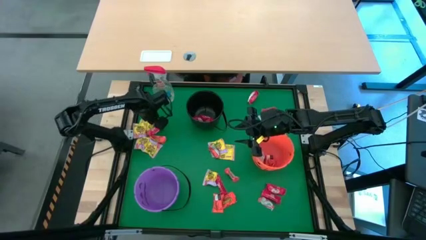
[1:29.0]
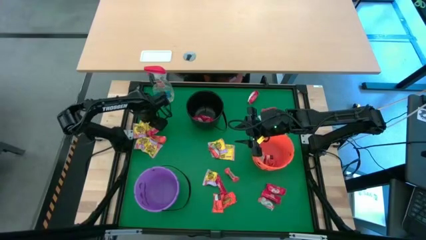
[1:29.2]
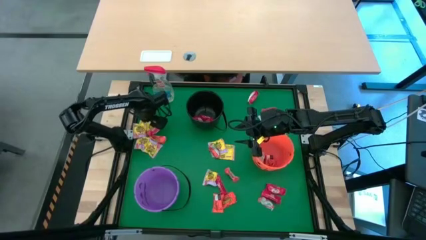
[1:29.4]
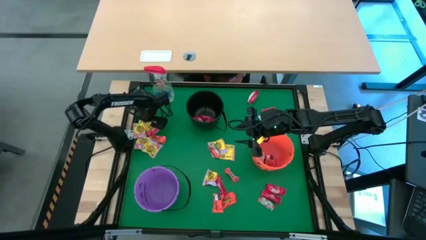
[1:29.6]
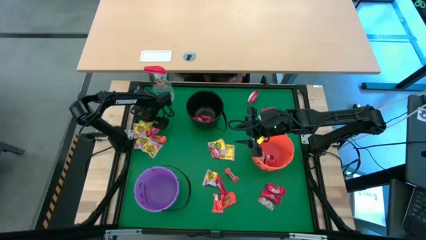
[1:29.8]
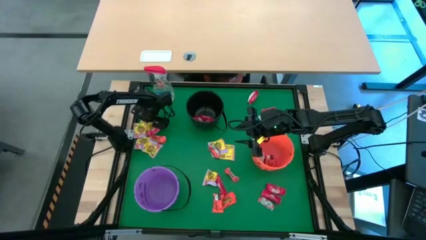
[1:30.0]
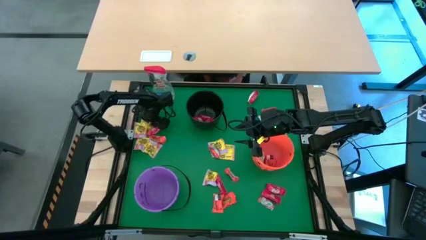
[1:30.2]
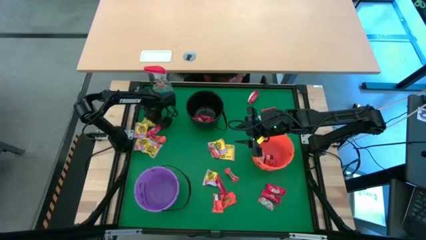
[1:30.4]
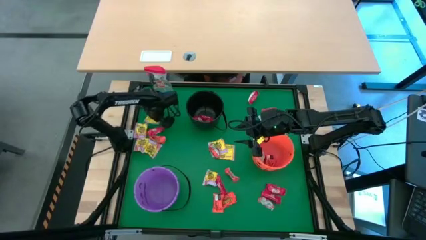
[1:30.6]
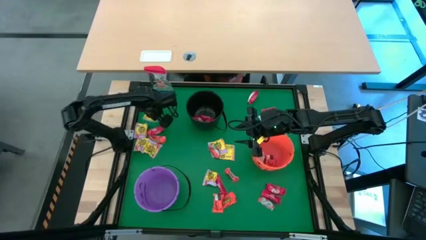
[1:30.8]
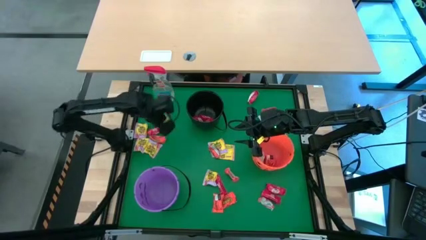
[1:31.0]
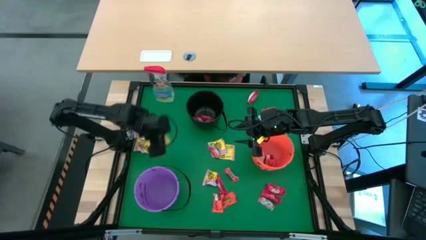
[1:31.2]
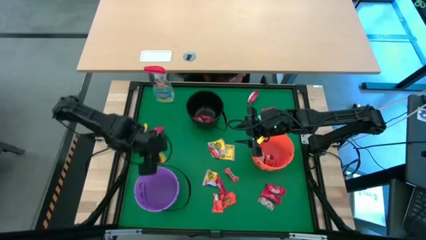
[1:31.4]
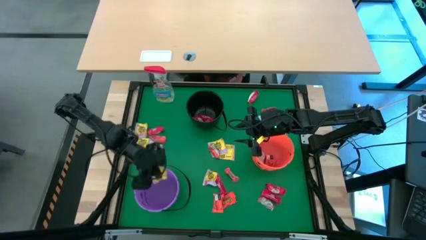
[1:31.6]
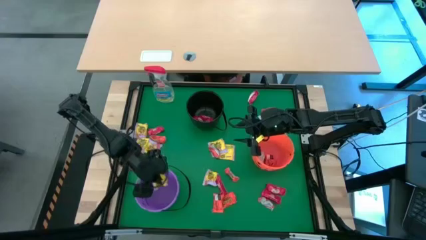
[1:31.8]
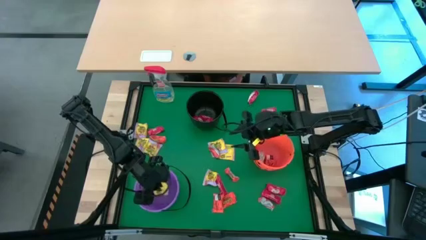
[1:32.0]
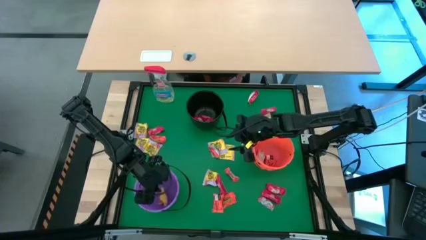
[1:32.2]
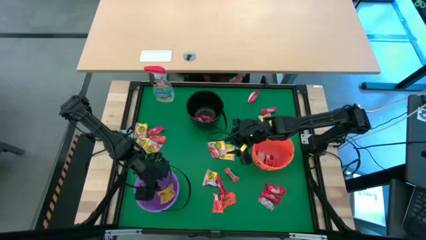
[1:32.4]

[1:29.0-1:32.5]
Task: Sort candy
Put the yellow candy into the violet bucket

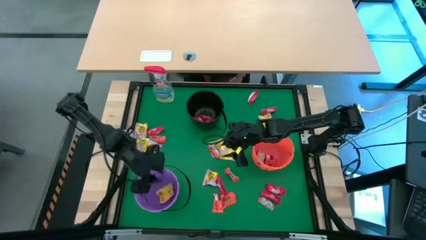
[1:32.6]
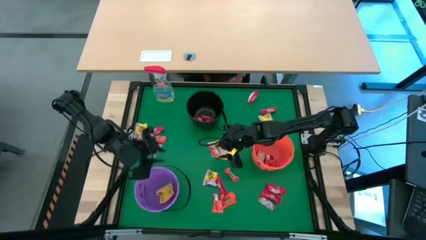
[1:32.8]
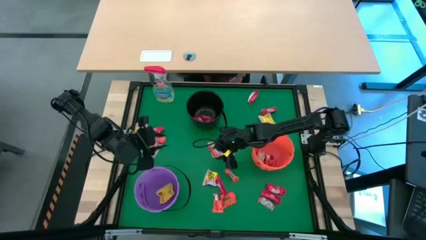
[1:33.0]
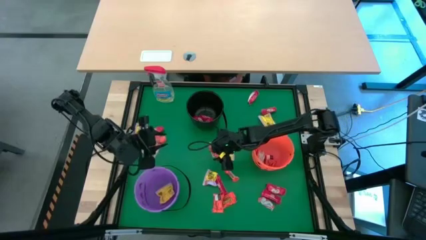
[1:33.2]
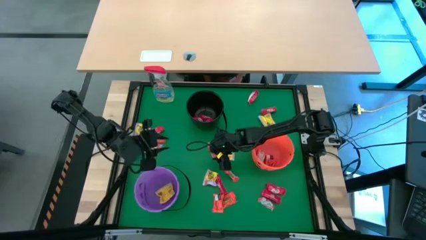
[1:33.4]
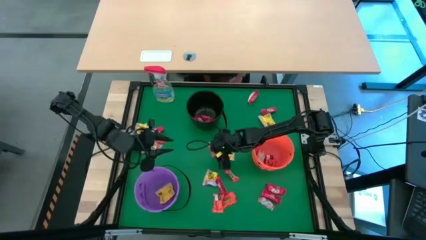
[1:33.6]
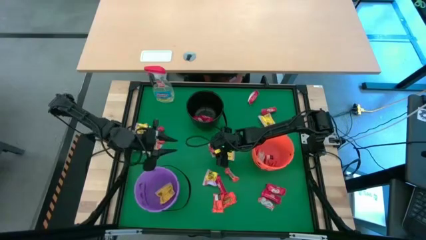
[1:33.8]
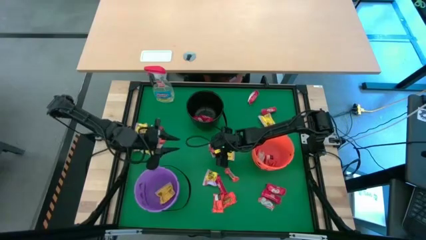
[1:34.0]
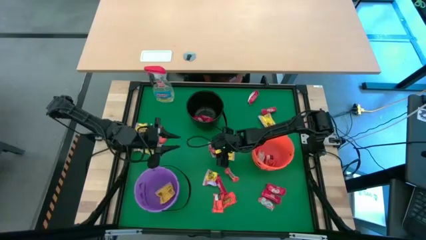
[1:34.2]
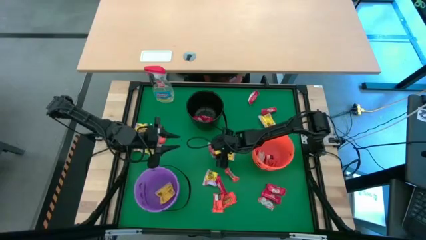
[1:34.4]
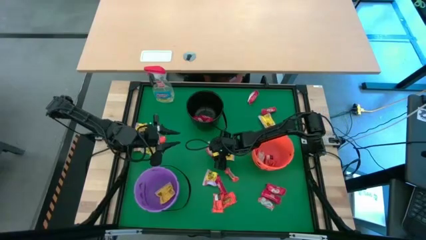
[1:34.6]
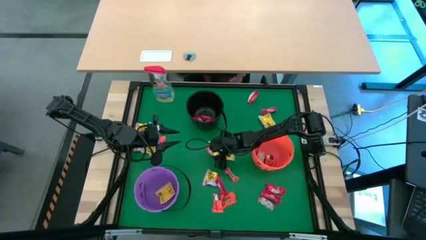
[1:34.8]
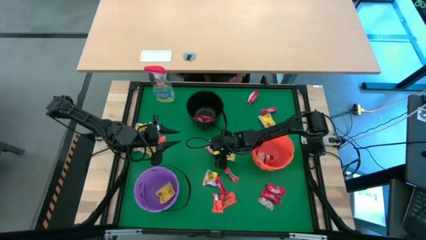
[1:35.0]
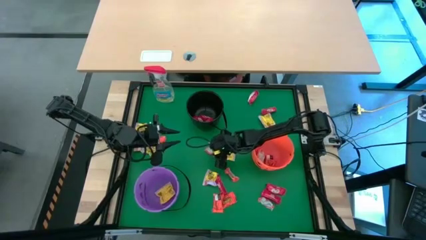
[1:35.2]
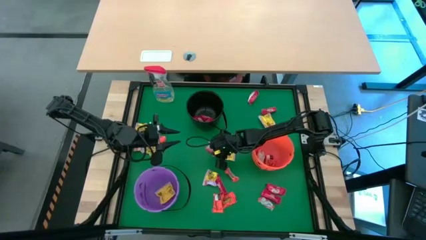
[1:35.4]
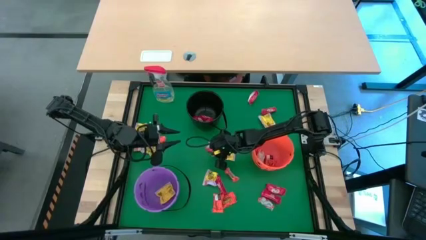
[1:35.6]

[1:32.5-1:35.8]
Put the orange candy into the orange bucket

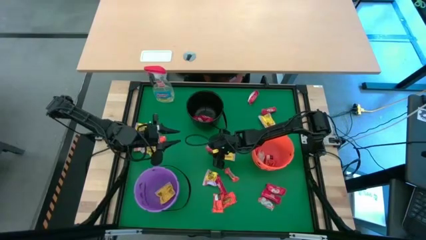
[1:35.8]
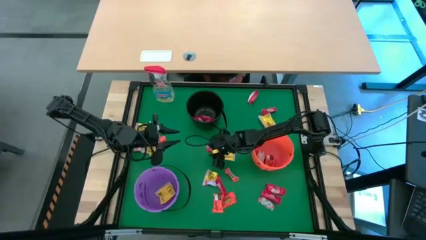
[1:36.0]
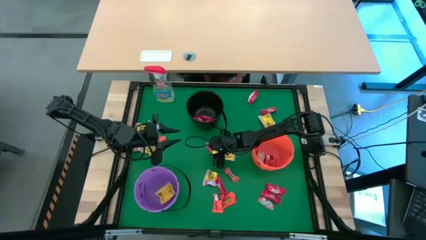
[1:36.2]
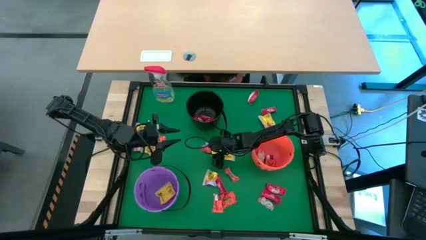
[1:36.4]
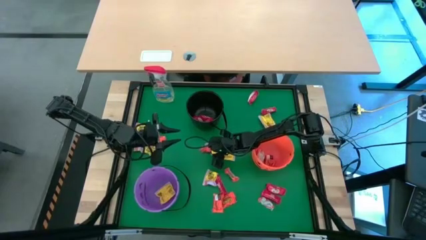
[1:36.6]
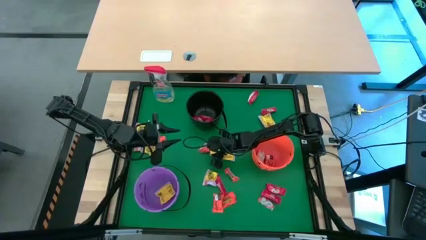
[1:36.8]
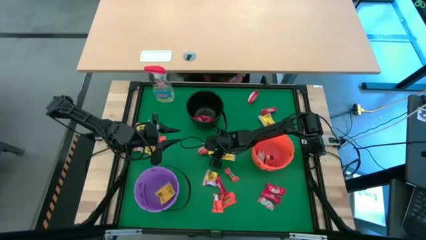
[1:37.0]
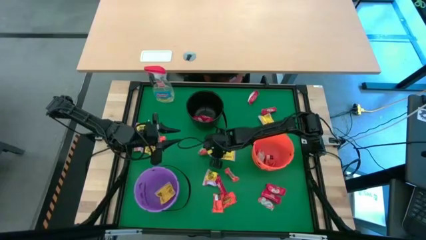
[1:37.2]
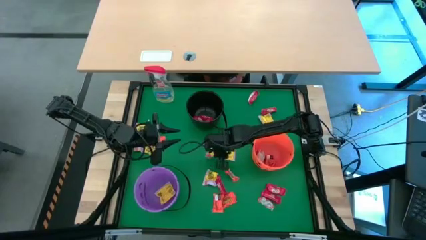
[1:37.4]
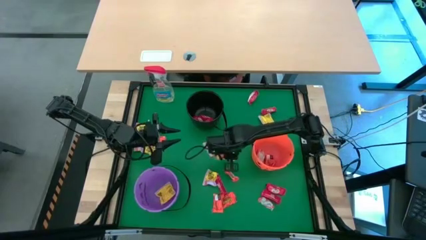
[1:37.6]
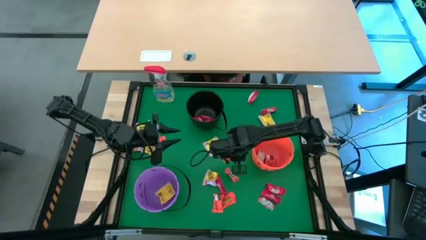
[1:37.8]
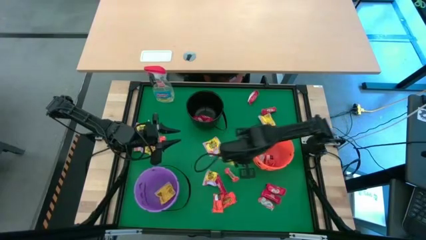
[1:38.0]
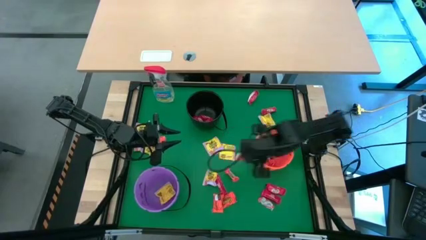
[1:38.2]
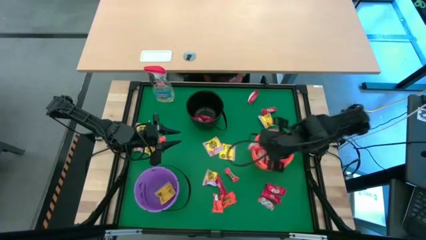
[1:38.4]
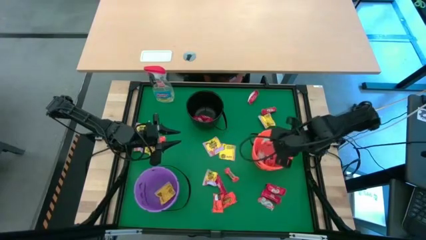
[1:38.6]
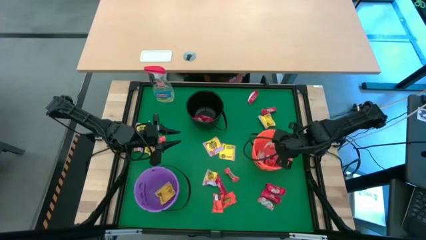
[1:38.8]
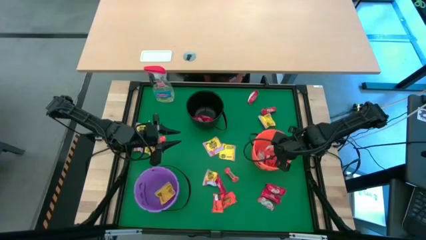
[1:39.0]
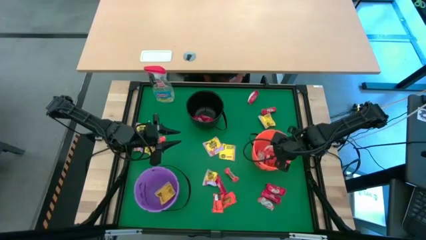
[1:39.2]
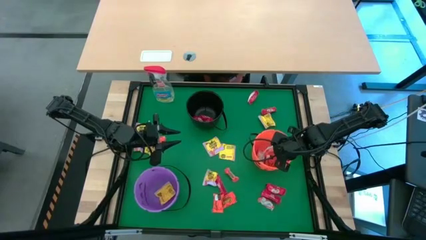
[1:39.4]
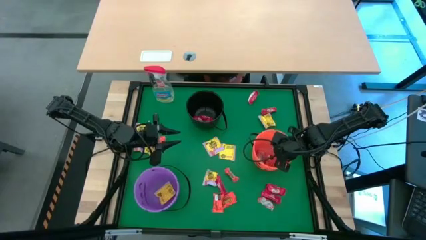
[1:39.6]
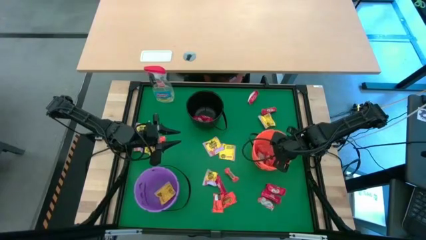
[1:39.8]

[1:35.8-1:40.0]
Put the orange candy into the orange bucket

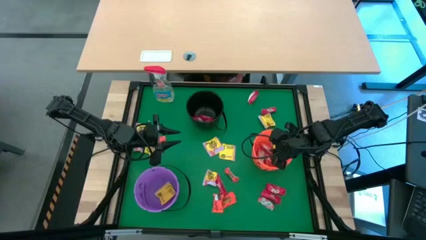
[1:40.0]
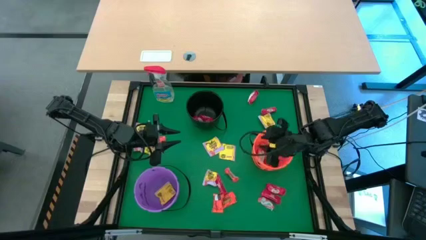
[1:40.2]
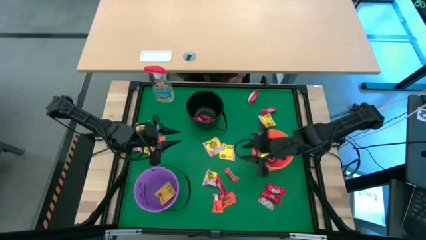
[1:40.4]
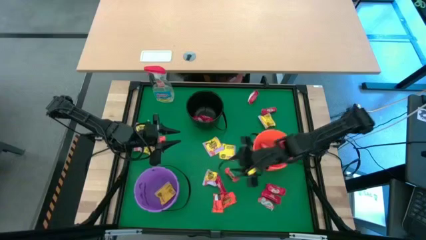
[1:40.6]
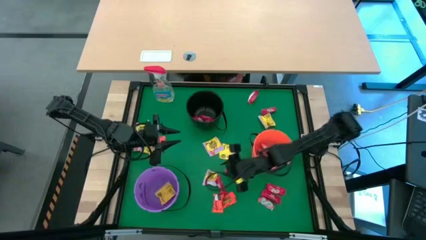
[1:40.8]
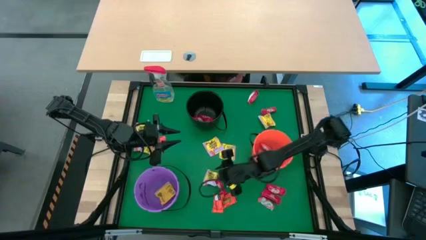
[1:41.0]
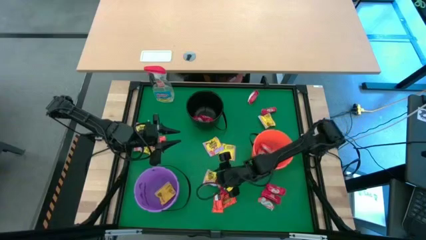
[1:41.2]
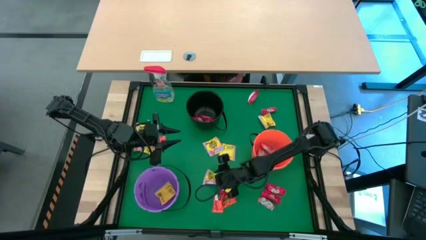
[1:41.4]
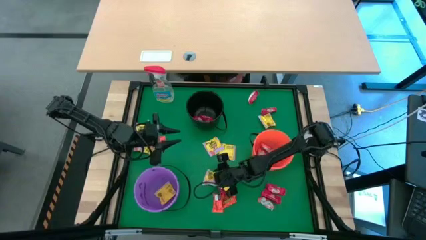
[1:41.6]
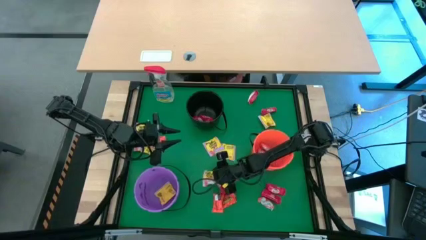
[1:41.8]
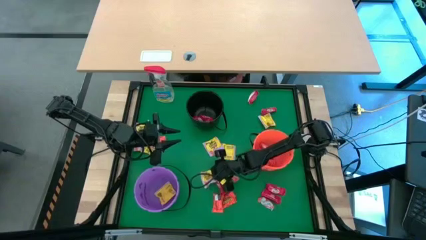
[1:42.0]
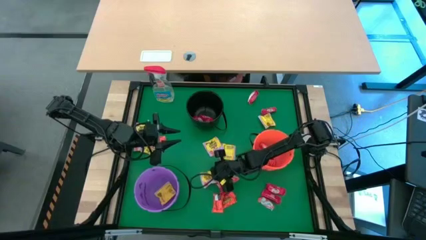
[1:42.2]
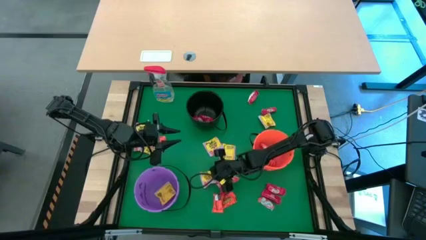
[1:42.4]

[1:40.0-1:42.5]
Put the yellow candy into the violet bucket

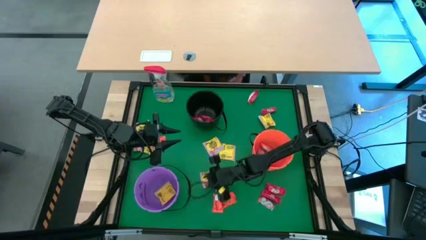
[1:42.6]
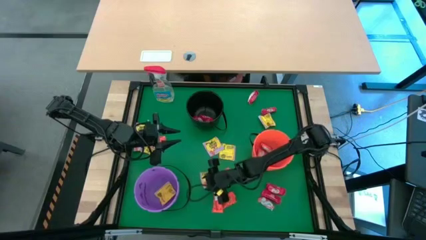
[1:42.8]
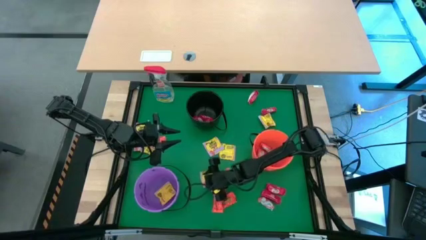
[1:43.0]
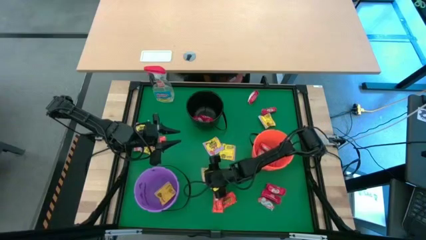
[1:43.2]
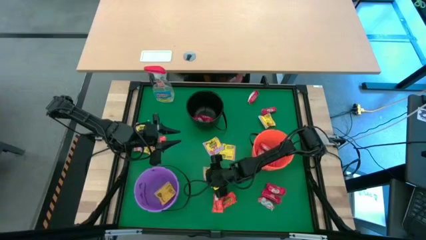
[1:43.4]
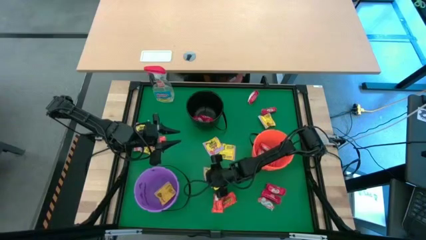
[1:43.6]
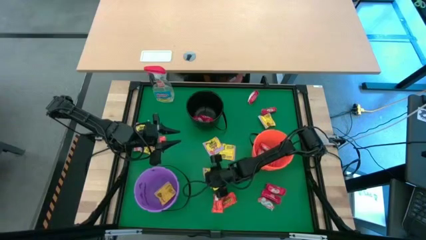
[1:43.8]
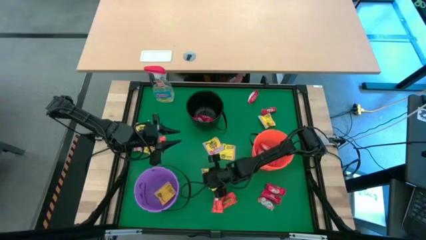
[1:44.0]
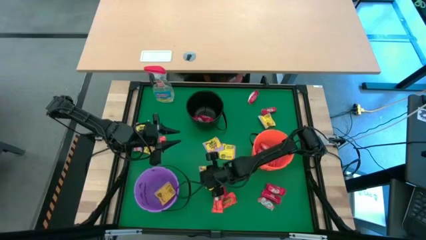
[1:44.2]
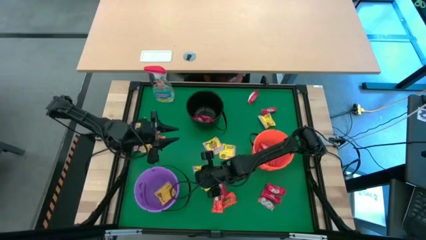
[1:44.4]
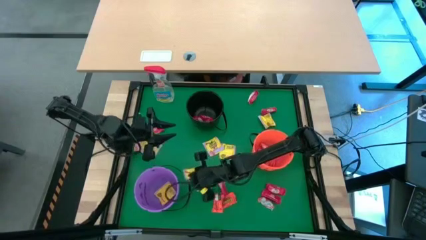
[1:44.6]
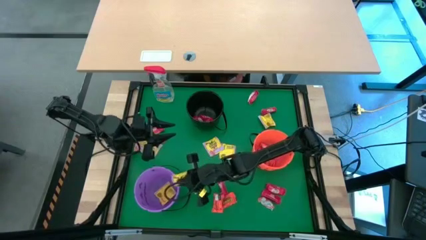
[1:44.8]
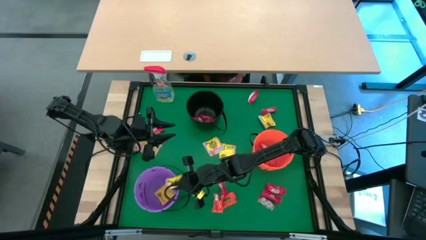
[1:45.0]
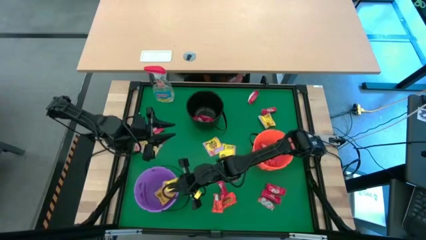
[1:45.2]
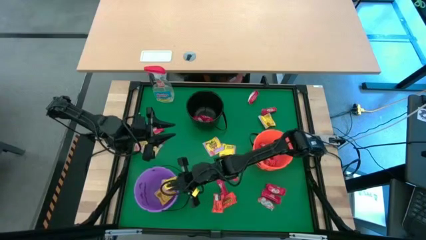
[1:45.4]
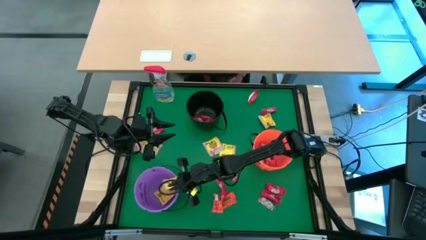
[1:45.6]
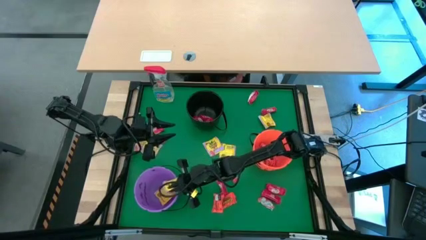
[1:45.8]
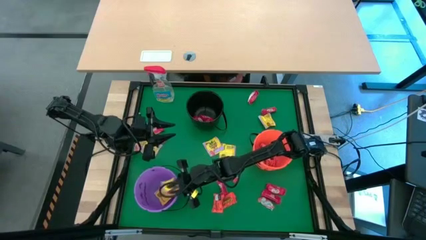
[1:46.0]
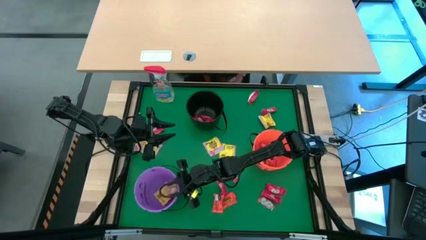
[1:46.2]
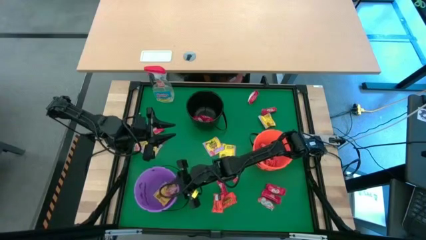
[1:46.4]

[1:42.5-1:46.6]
Put the yellow candy into the violet bucket
